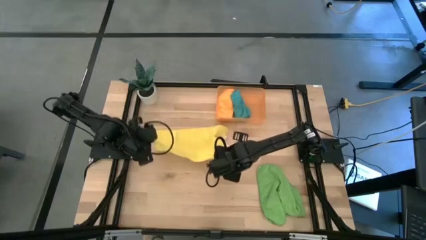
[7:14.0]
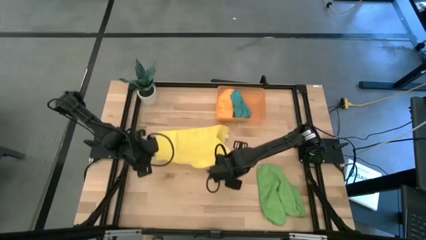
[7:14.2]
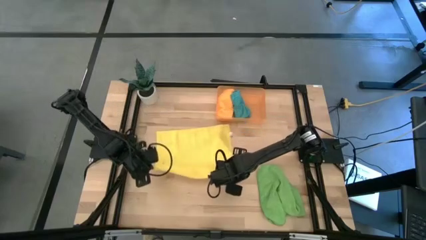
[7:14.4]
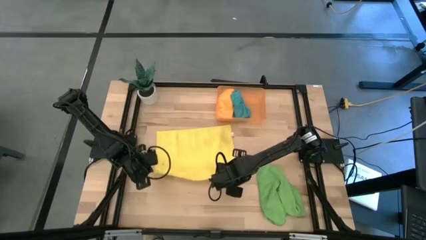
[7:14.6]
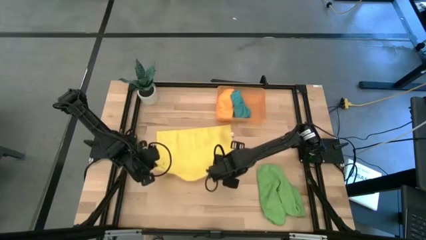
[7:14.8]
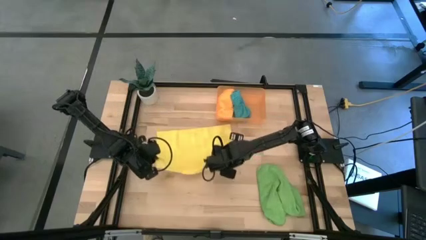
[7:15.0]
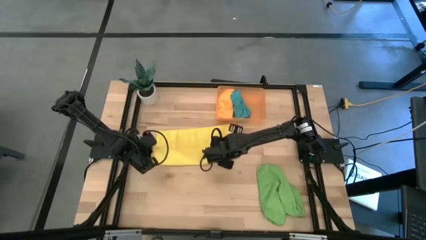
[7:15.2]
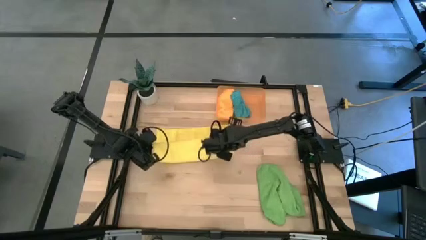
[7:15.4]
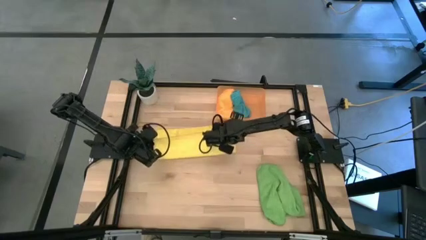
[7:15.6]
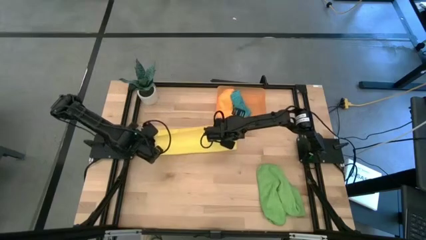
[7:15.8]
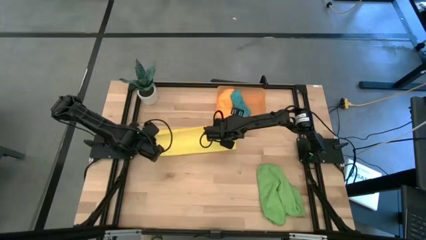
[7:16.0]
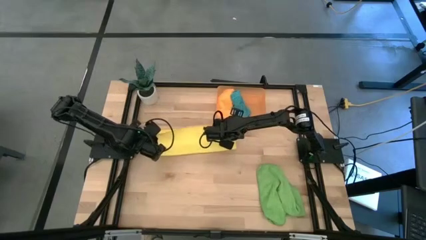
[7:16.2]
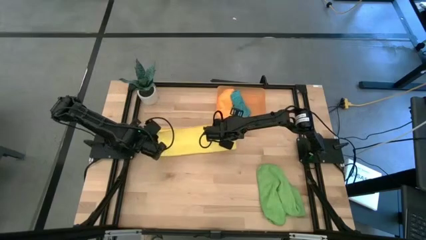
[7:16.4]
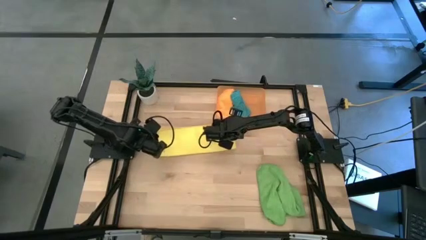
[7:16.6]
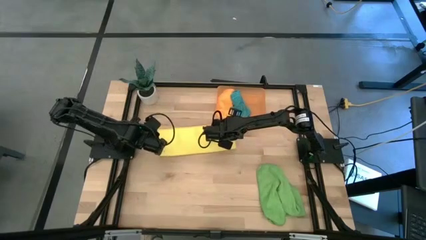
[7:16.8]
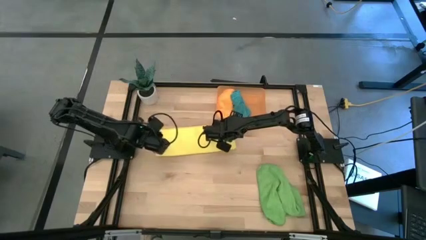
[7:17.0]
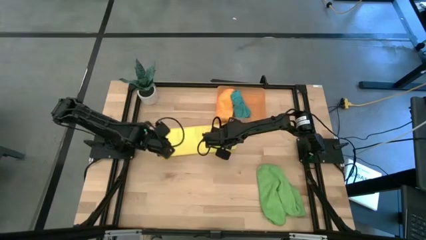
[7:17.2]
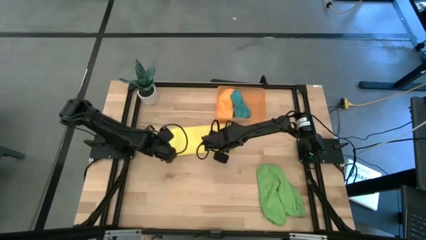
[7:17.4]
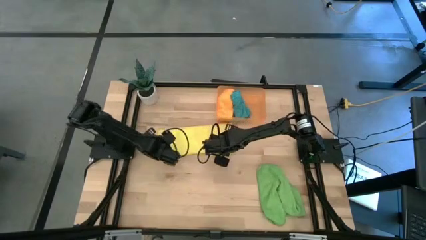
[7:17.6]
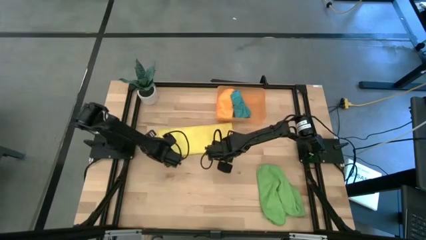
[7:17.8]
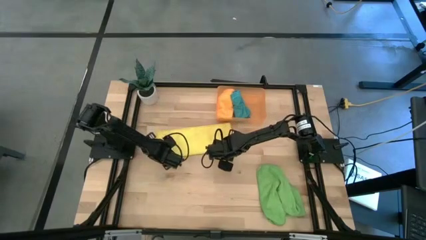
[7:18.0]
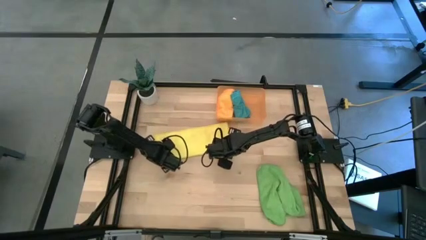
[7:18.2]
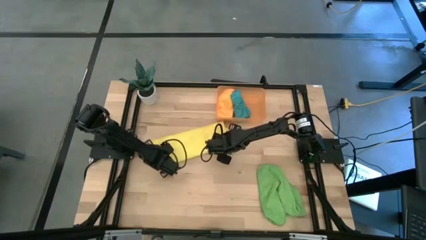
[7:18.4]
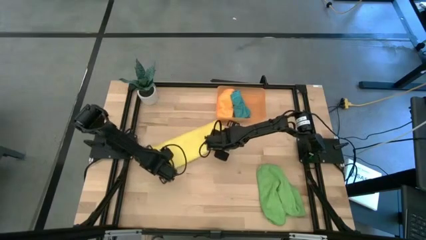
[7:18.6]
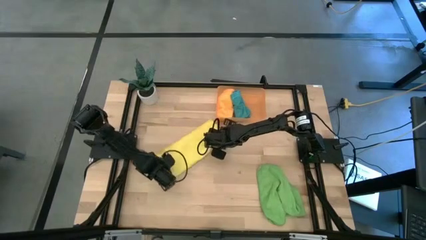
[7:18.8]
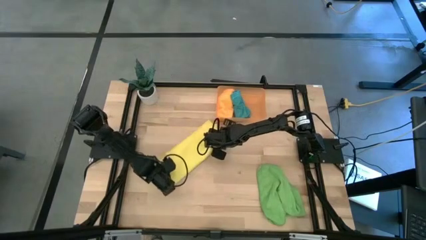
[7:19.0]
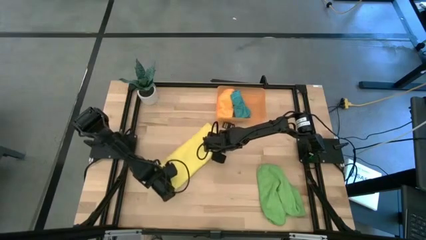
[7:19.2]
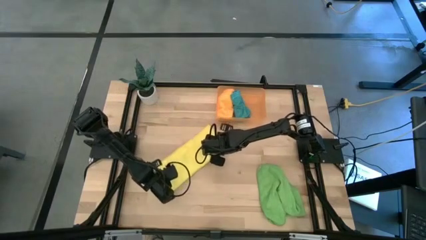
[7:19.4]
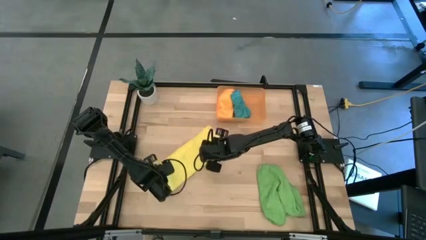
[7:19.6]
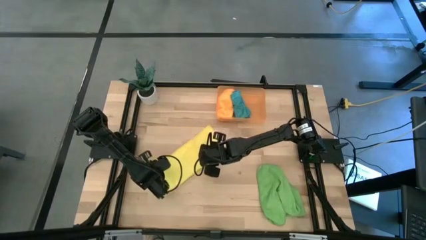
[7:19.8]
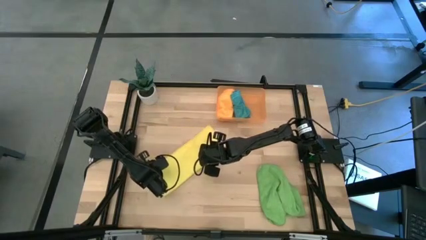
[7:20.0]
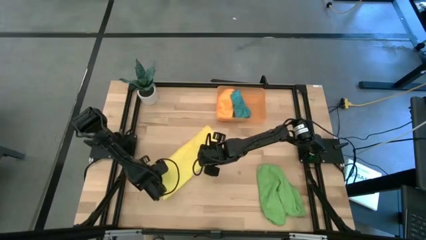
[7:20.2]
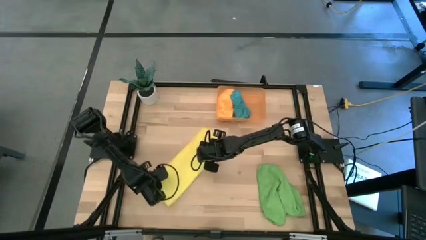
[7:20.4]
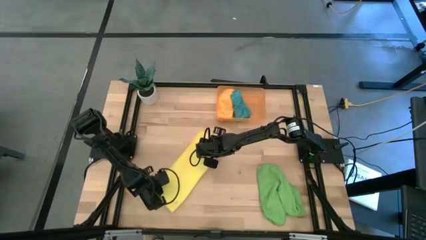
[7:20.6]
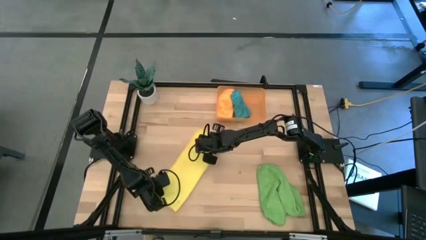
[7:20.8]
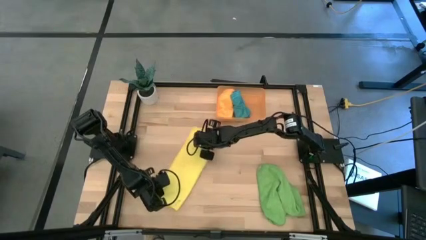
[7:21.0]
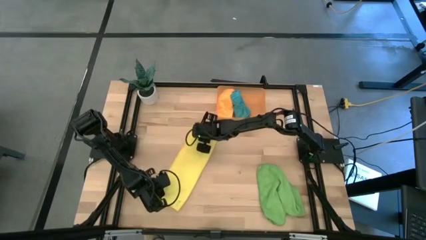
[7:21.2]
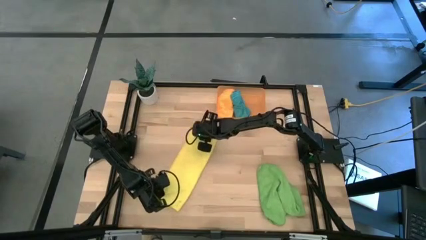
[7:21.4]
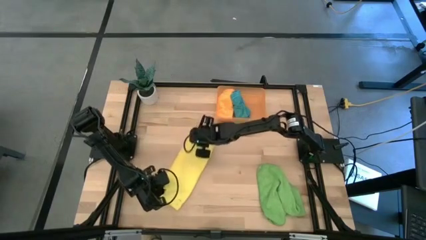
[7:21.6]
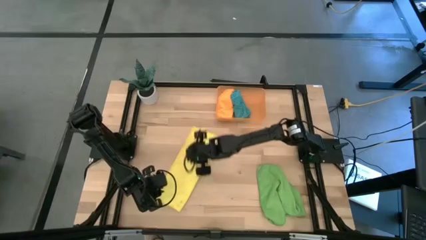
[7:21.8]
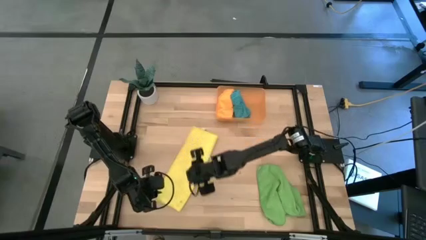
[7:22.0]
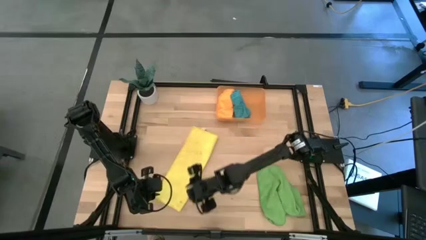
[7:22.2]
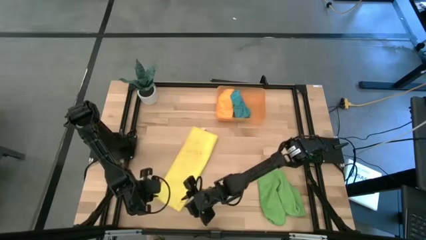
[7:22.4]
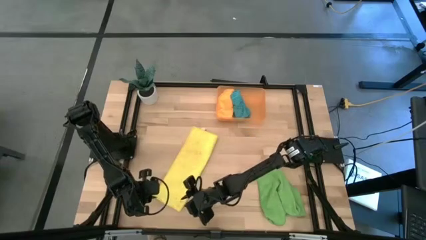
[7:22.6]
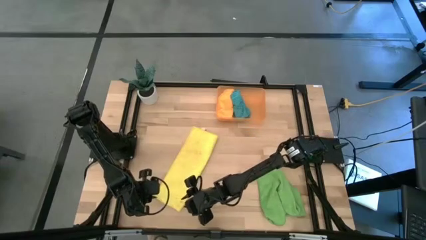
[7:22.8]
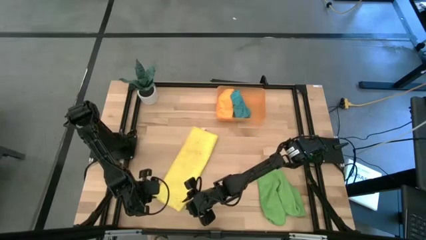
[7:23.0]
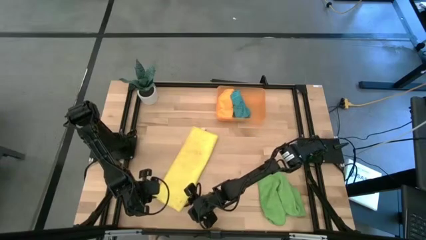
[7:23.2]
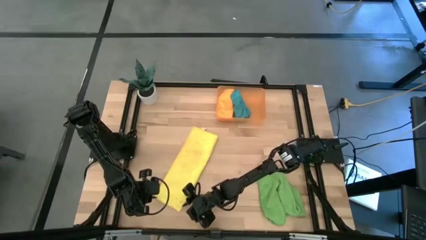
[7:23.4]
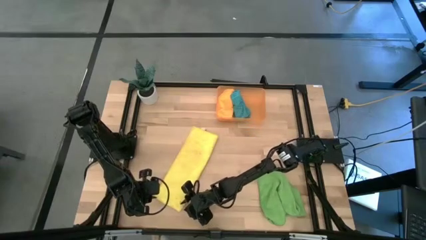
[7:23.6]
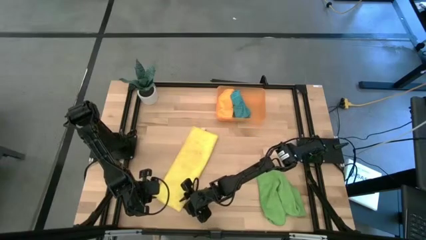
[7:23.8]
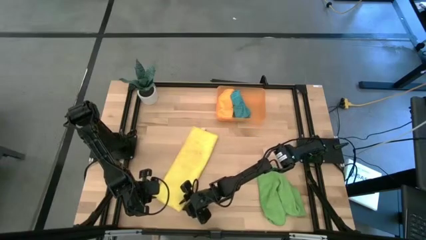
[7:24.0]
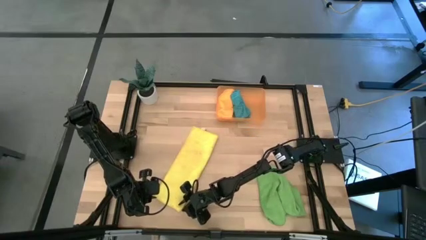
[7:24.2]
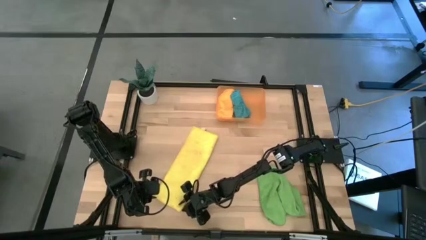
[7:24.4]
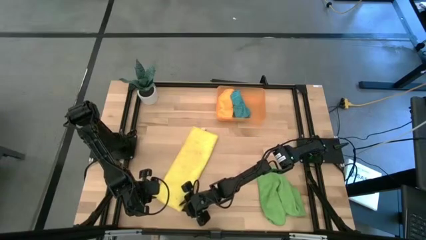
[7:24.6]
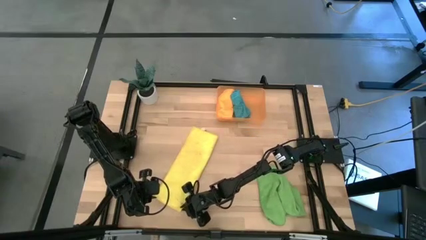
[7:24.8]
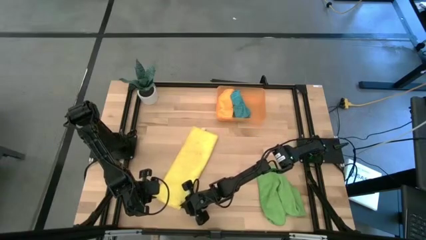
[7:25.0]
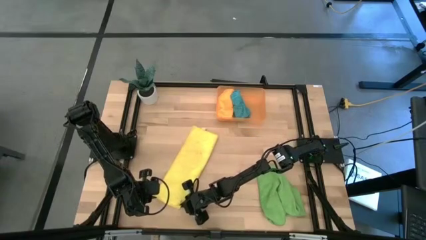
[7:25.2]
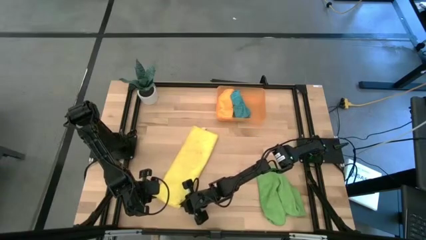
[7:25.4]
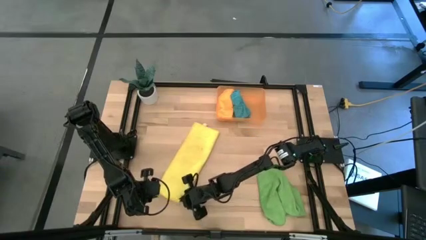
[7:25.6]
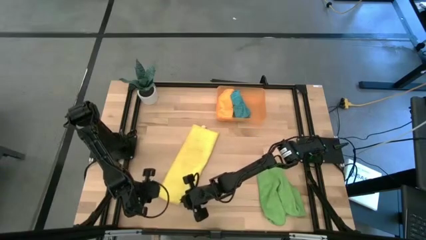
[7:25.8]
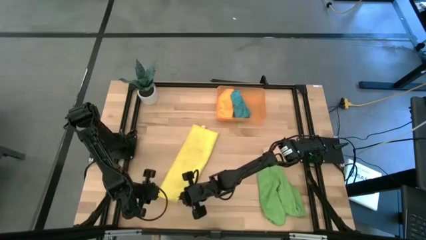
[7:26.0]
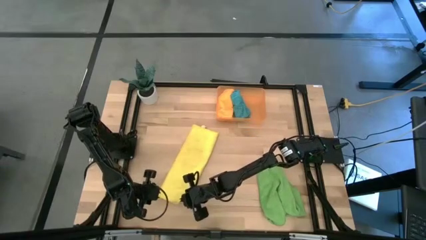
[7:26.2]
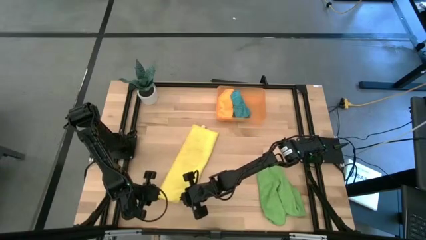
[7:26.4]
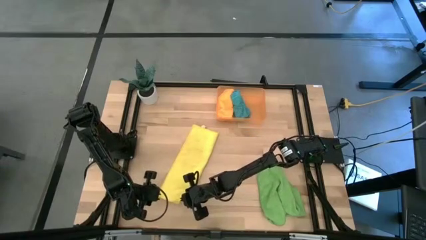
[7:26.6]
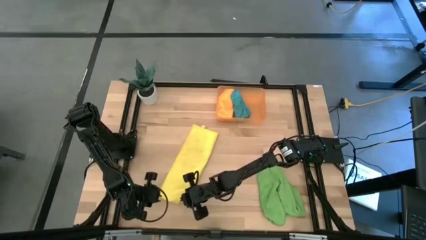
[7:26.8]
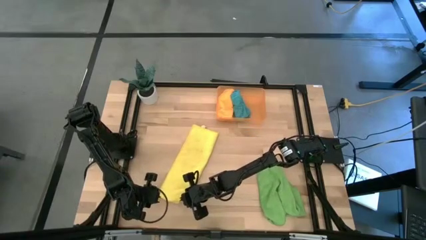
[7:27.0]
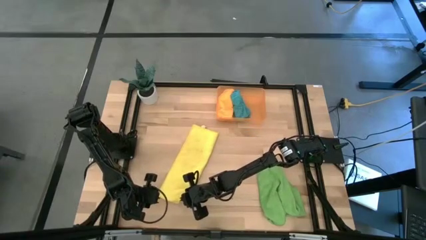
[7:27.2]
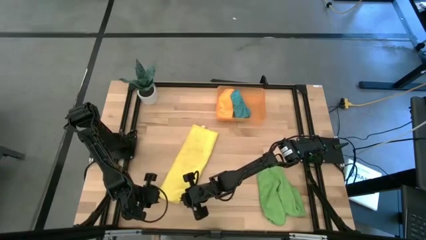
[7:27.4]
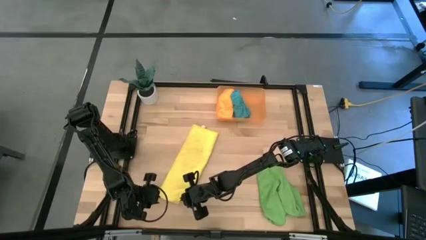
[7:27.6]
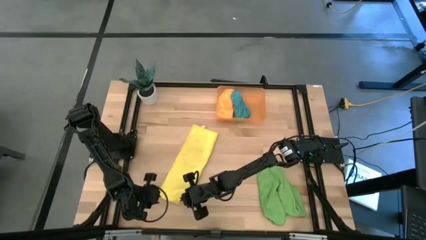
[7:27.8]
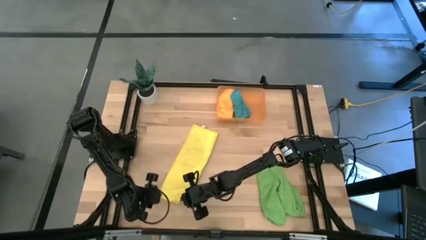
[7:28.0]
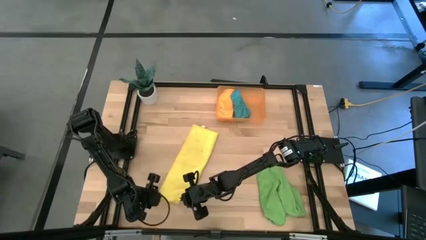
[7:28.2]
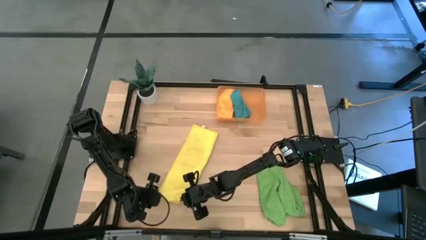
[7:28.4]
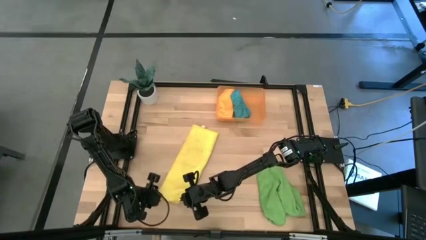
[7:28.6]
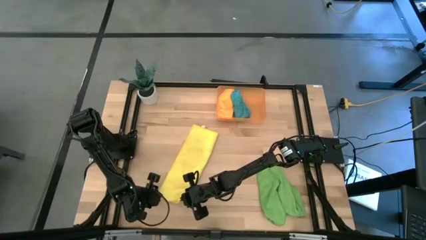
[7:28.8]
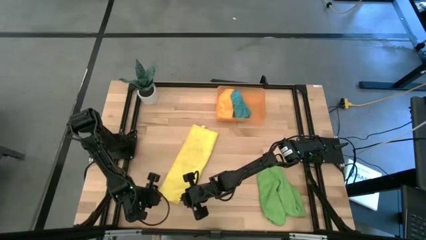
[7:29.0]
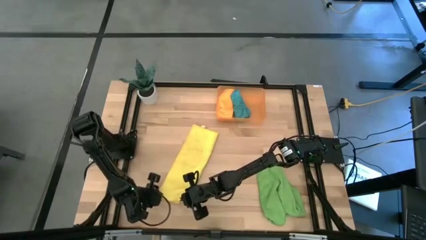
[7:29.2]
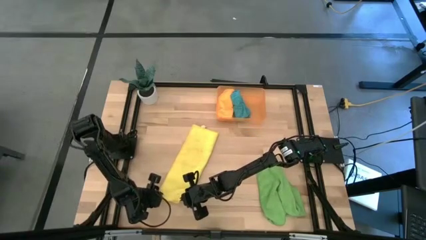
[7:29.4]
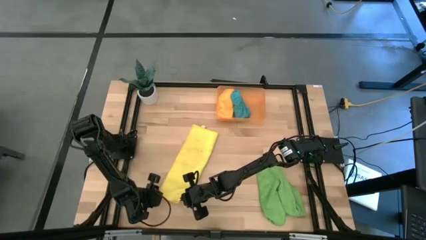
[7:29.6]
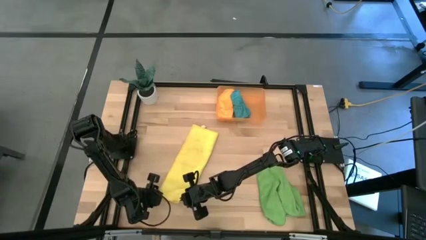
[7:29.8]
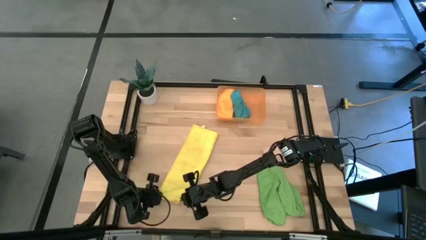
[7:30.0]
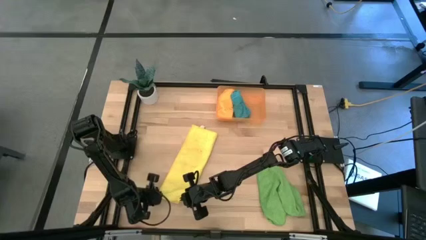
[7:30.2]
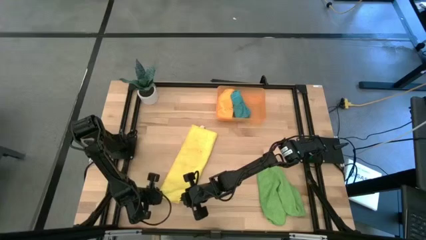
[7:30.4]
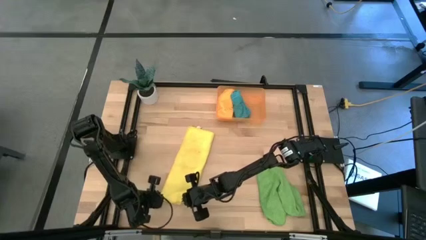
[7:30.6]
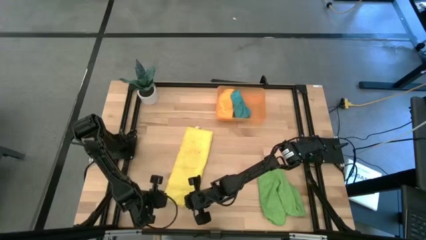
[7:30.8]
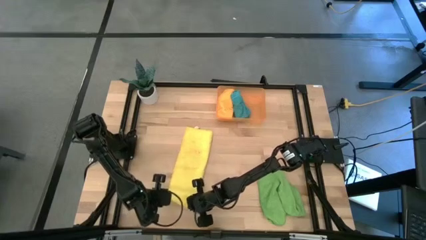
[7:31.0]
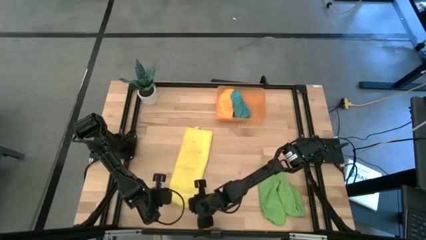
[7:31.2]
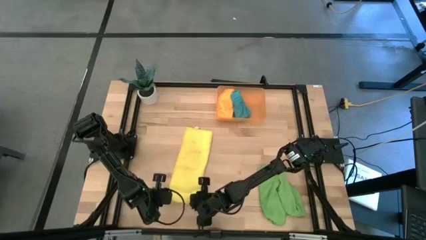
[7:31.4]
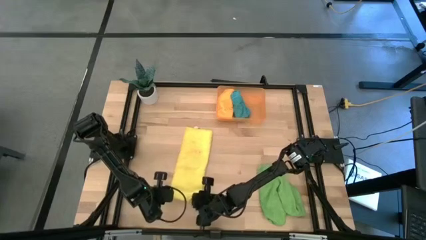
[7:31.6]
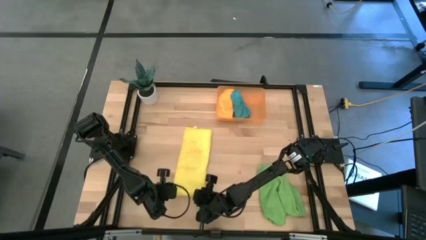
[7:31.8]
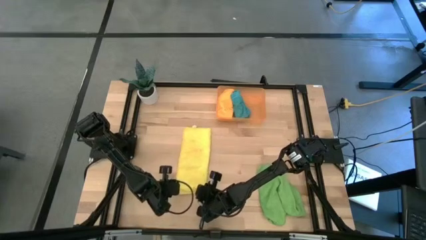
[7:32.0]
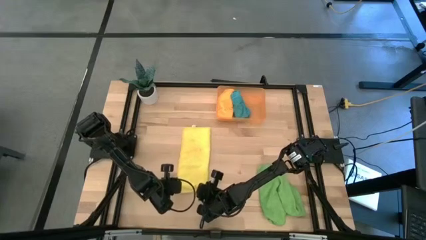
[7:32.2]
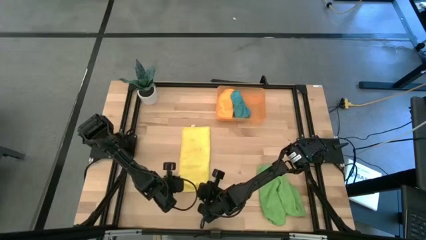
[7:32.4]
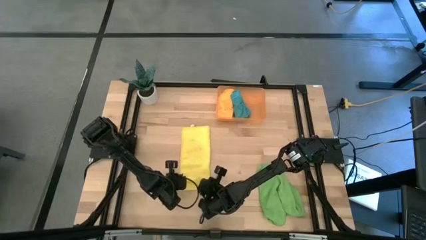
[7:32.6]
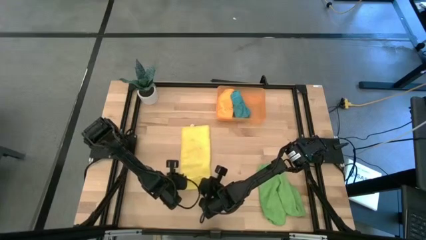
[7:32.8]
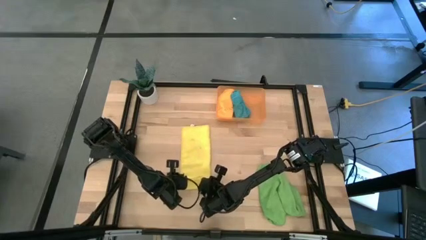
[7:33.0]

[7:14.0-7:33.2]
Task: Roll microfiber towels into tight, uniform cylinder then place into a basket
Roll the yellow microfiber towel
